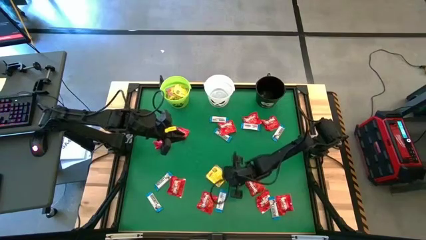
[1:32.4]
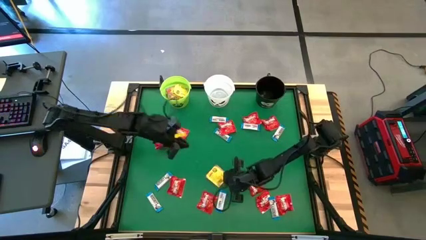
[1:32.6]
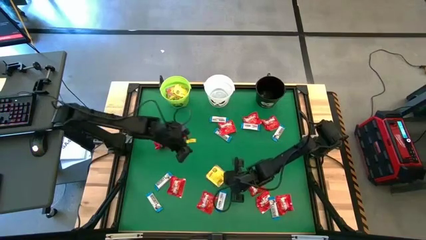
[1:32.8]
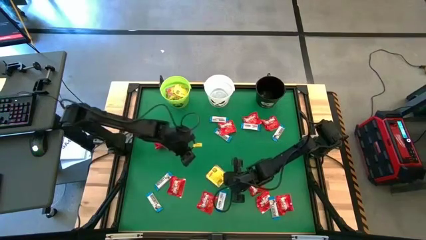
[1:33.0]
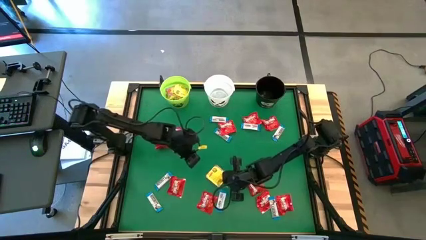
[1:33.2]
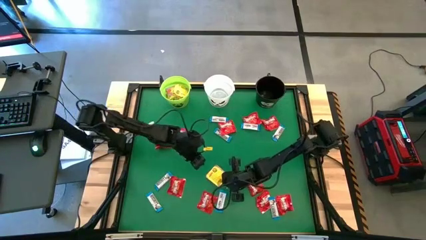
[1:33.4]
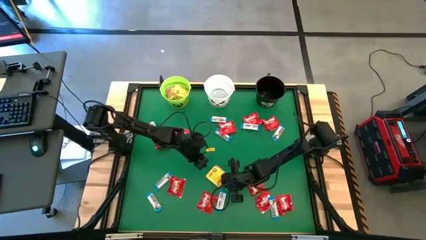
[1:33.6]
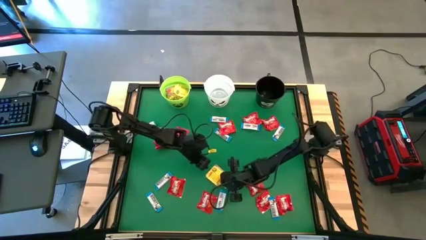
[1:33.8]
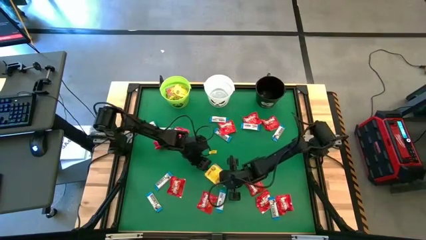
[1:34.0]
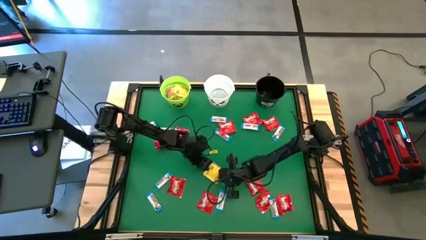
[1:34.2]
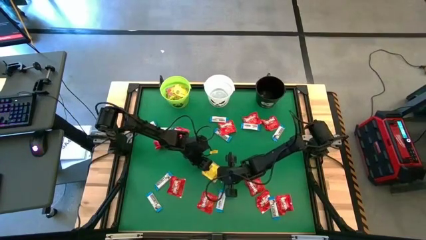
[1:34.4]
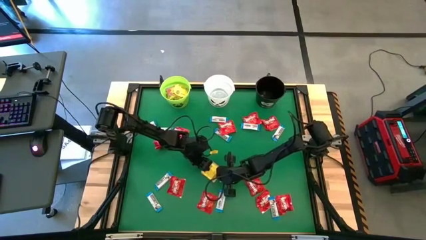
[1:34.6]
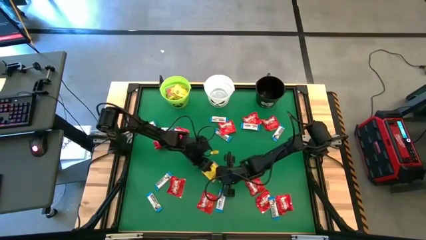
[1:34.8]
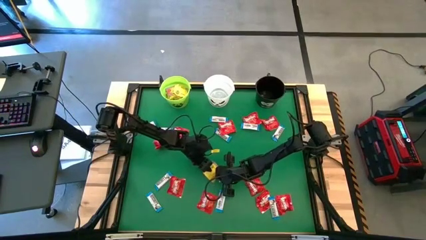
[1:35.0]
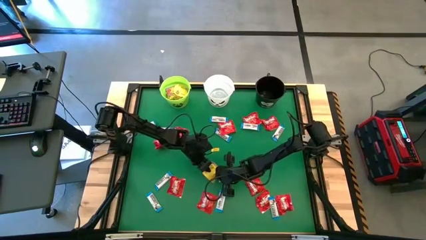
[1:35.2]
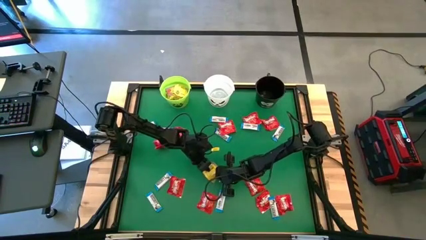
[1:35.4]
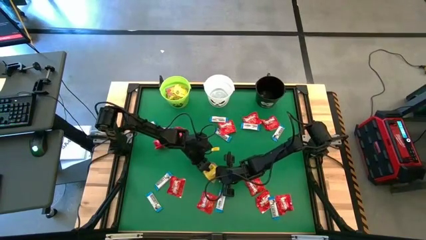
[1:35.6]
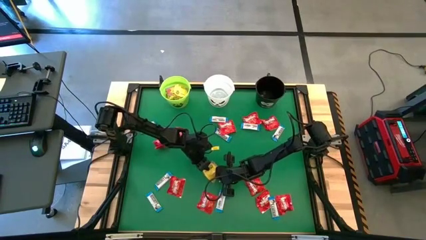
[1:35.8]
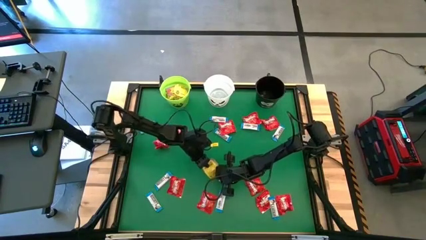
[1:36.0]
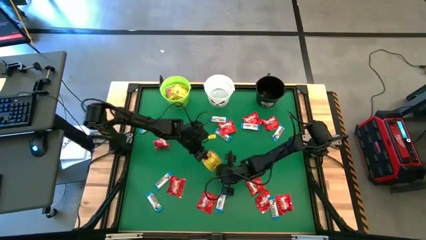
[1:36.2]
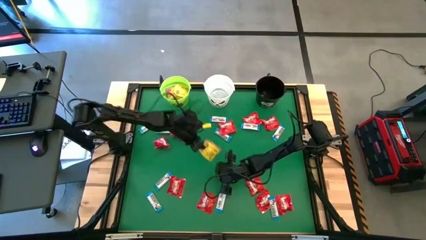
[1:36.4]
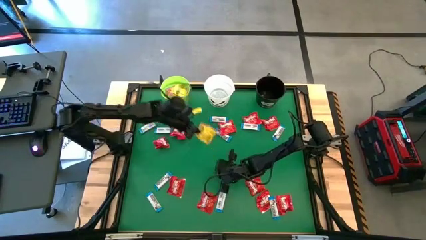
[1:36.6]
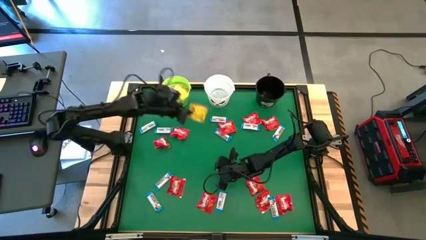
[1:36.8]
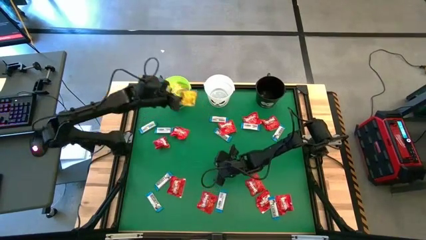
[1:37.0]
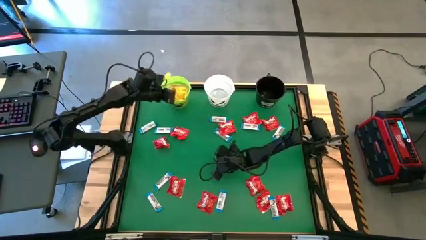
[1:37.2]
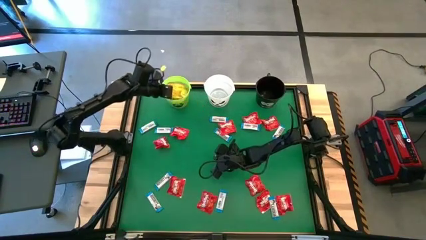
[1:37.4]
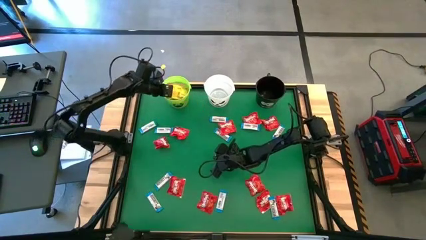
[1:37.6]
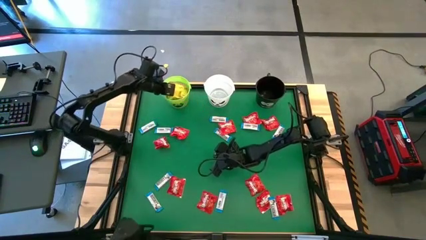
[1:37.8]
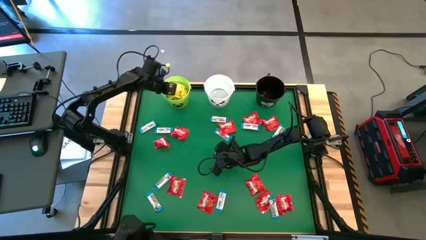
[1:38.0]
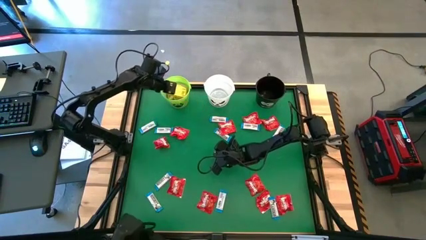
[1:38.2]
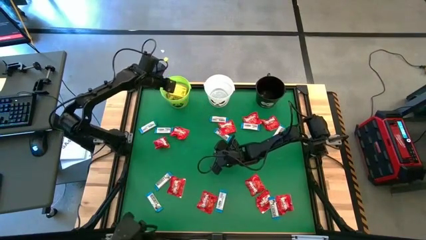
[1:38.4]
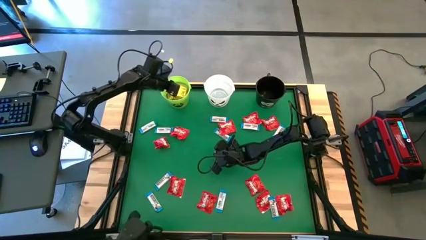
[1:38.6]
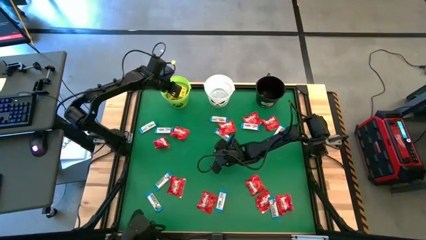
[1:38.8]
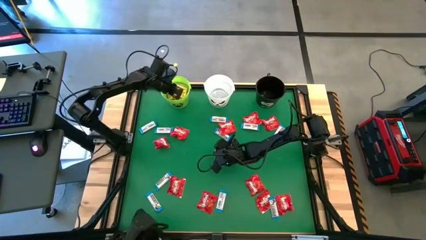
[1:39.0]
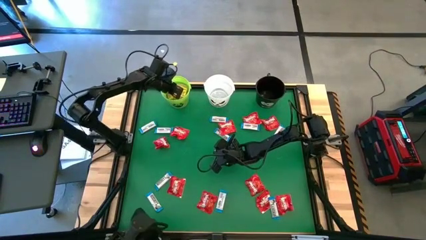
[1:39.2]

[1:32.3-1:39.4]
Task: Sort candy by brand, put in halloween buckets
Put the yellow candy into the green bucket

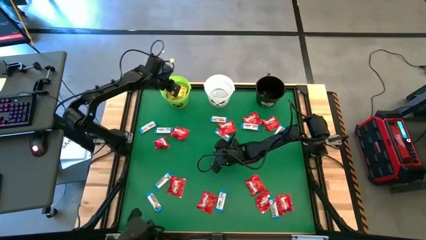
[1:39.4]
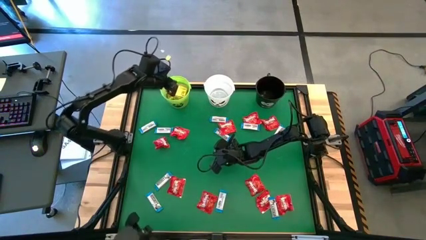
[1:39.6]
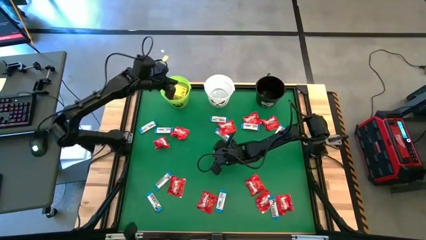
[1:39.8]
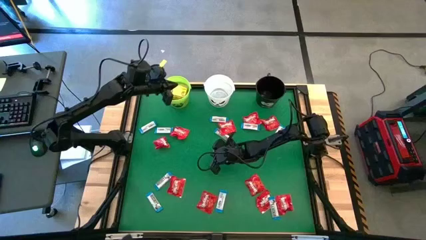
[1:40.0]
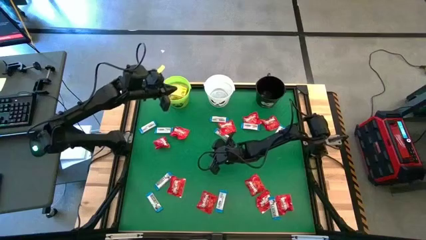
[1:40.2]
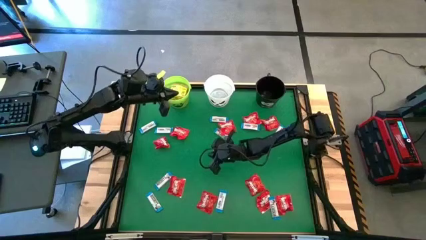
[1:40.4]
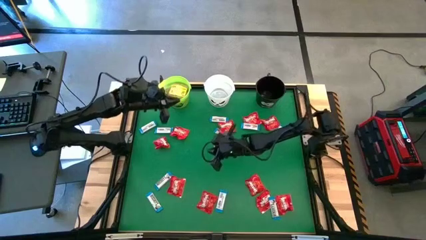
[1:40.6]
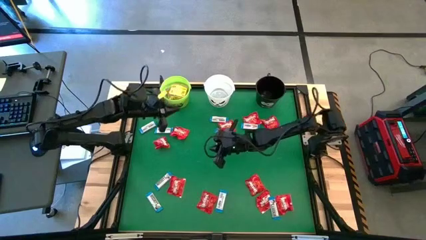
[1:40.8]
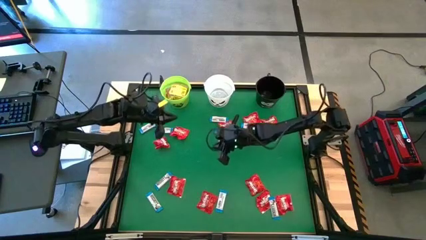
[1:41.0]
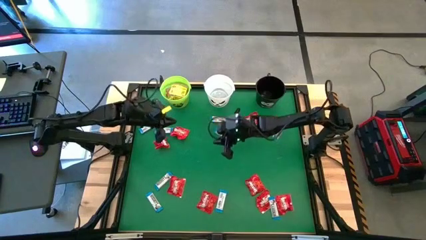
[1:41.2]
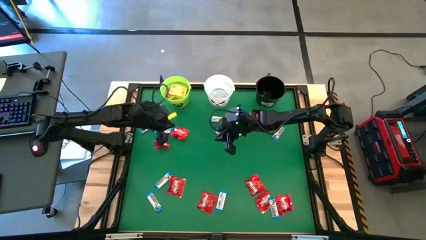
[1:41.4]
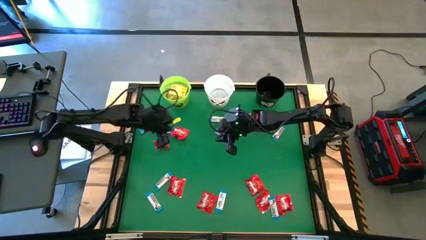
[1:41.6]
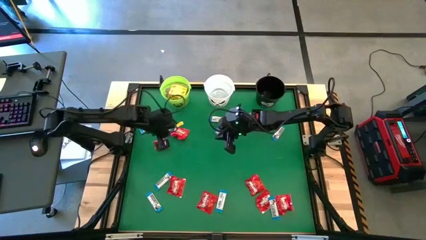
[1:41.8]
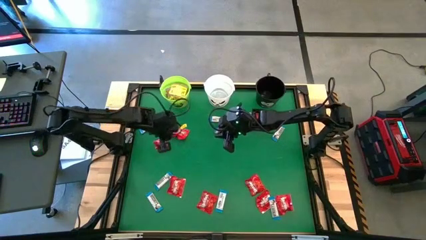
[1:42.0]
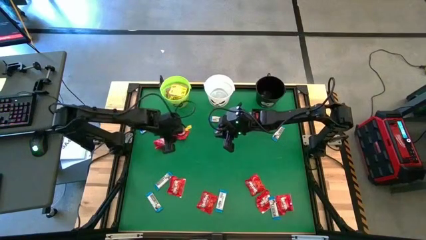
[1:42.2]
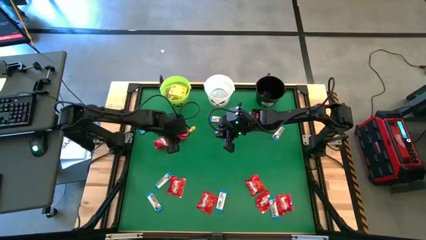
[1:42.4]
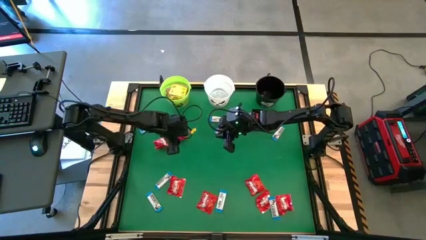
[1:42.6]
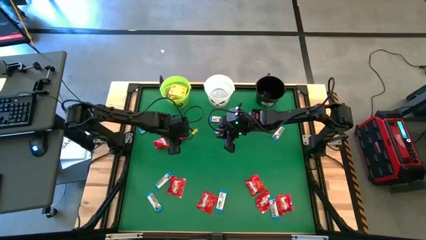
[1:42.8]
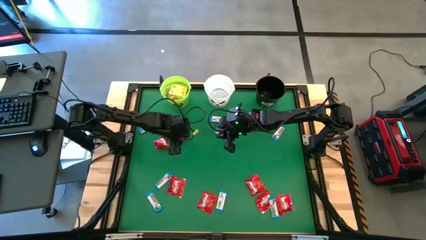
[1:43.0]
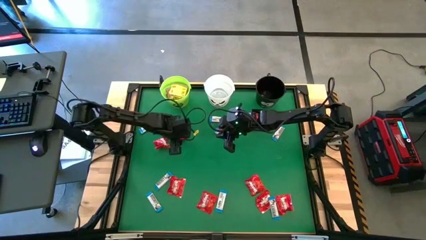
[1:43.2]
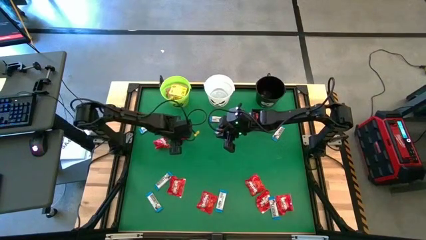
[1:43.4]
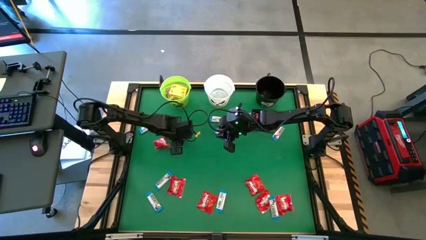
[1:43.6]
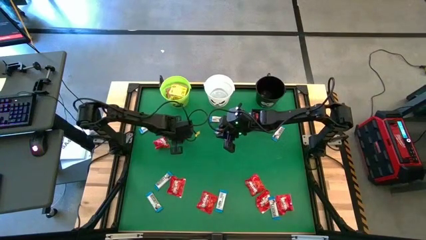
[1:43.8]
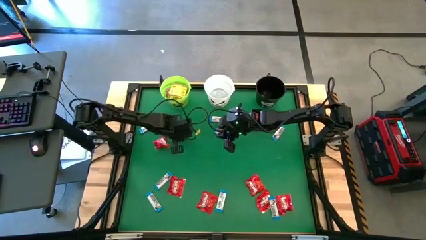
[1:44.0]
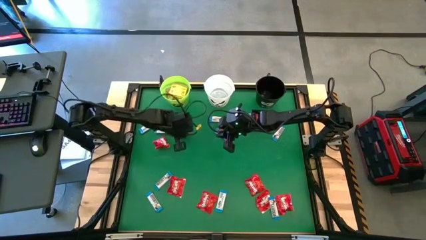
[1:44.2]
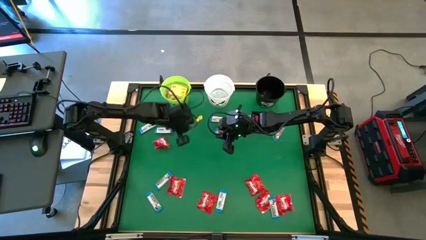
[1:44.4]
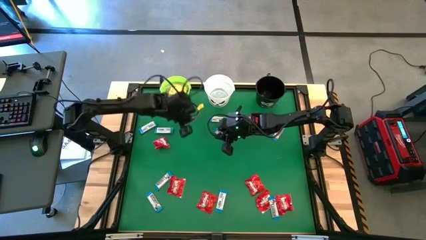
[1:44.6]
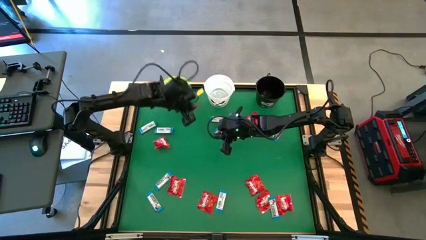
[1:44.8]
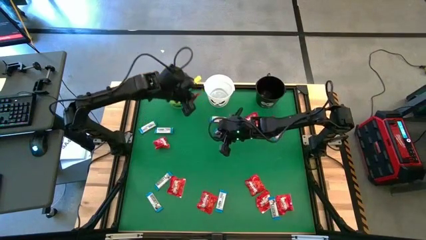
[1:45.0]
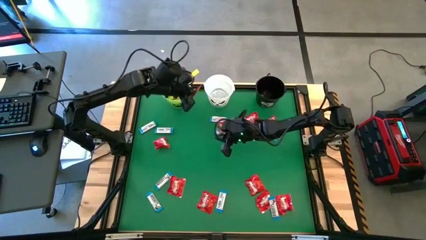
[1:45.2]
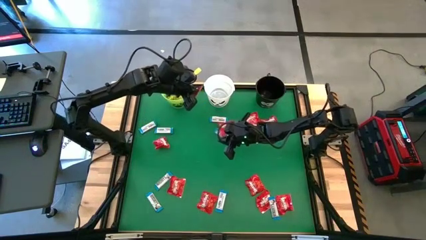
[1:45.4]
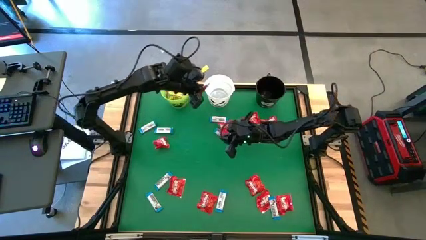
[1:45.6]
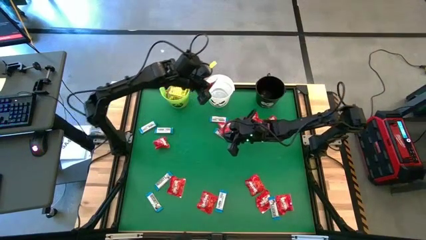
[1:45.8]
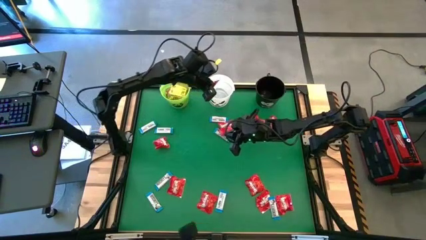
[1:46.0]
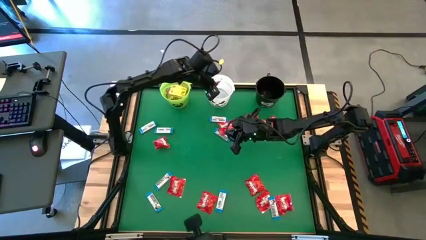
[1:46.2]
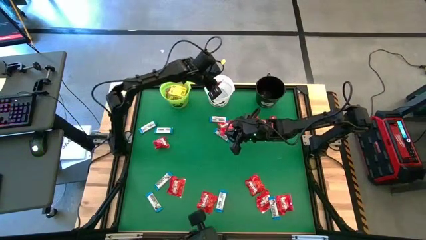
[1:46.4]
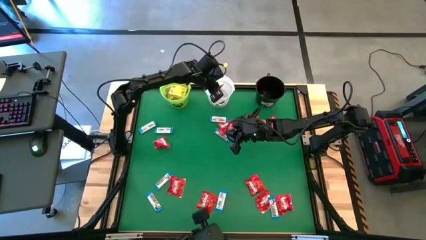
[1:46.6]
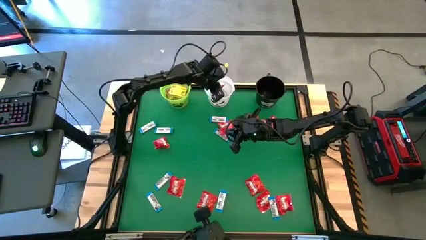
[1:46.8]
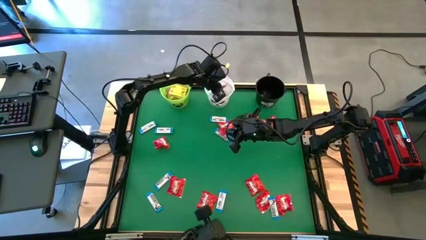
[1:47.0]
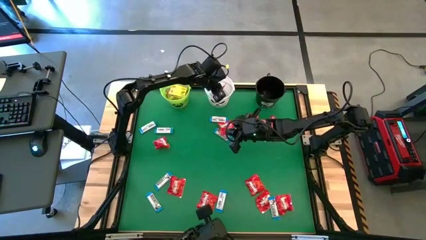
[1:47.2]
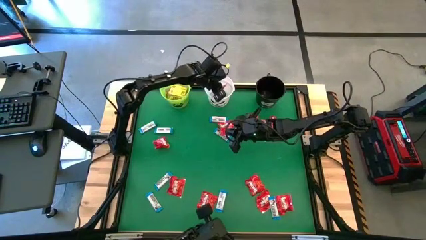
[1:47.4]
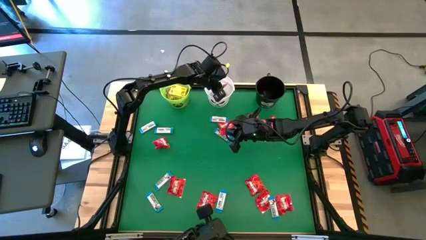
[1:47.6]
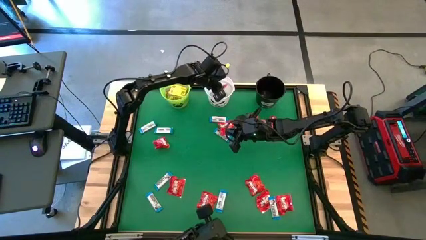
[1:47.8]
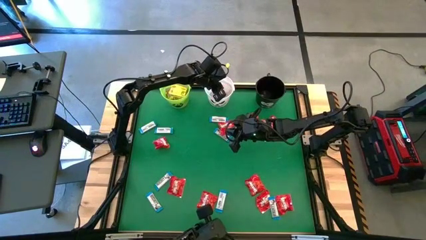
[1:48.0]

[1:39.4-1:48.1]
Put the red candy into the white bucket
